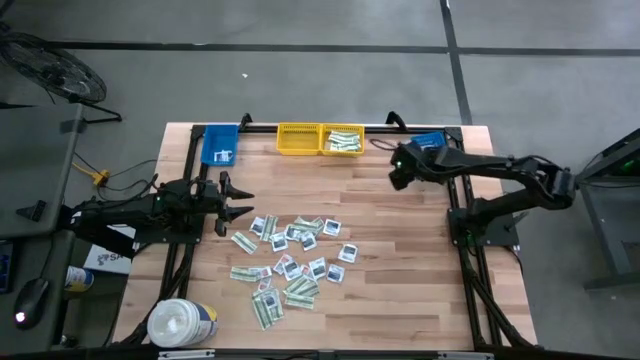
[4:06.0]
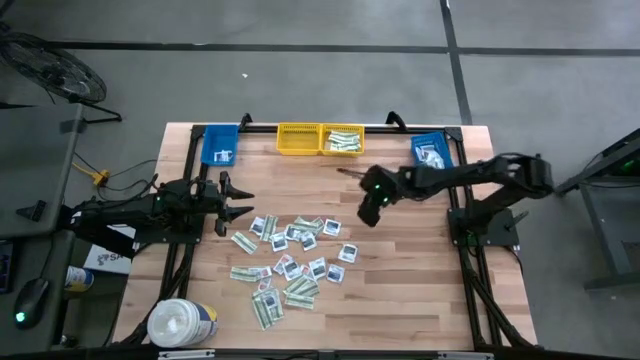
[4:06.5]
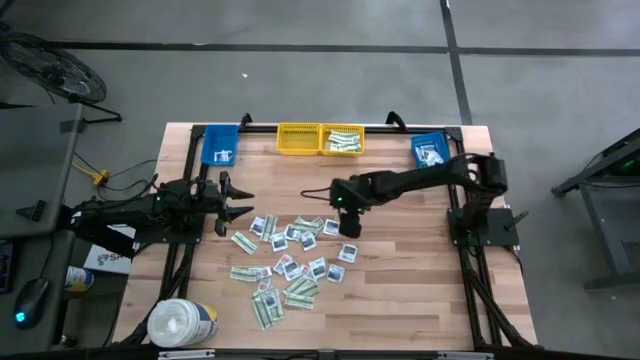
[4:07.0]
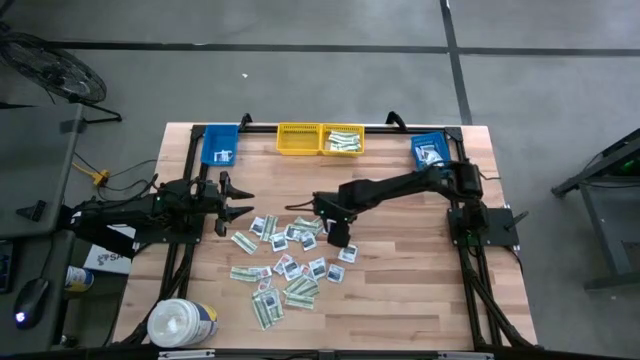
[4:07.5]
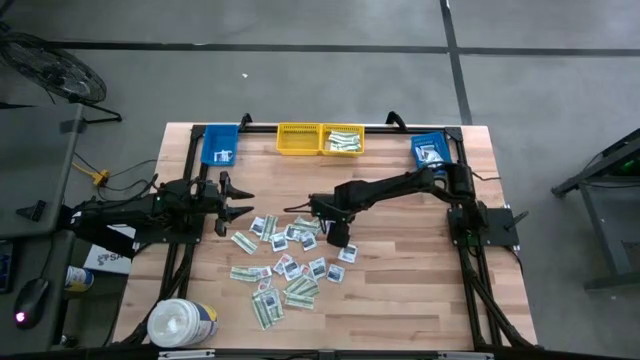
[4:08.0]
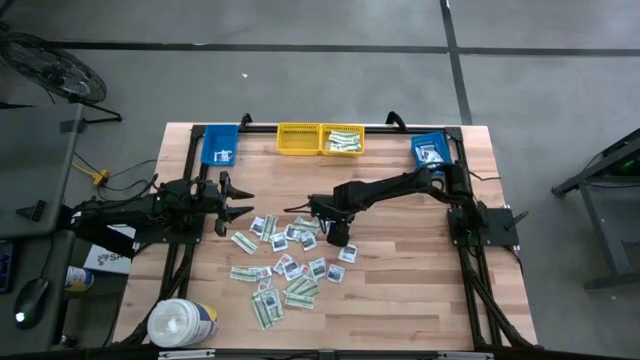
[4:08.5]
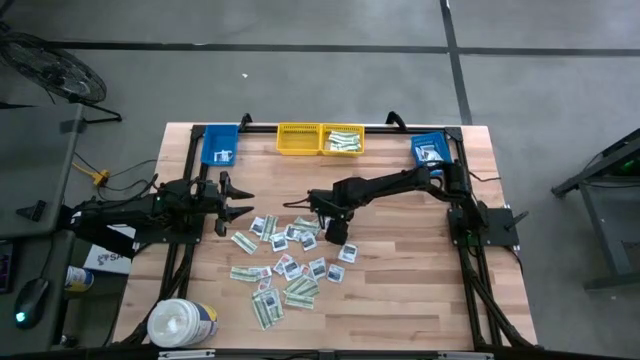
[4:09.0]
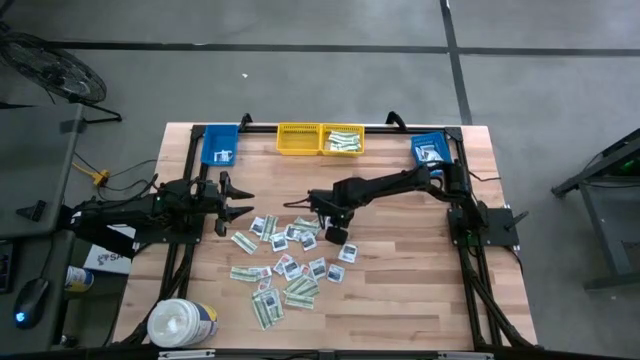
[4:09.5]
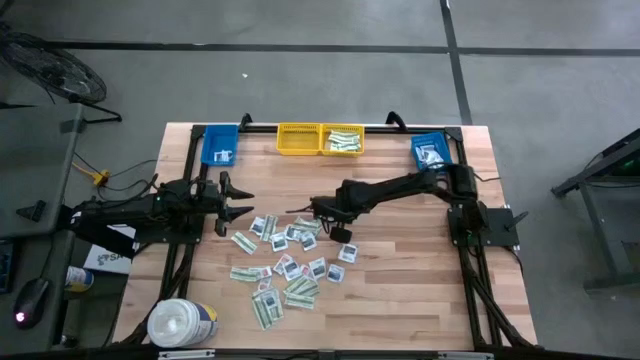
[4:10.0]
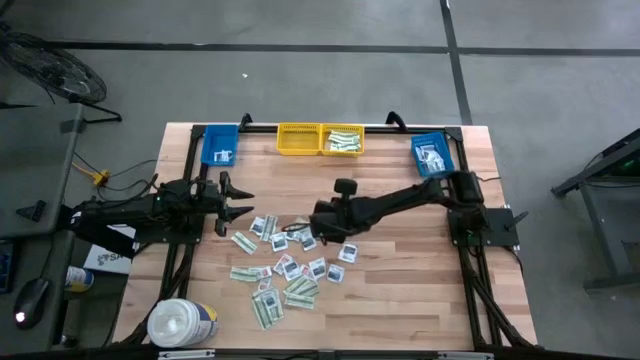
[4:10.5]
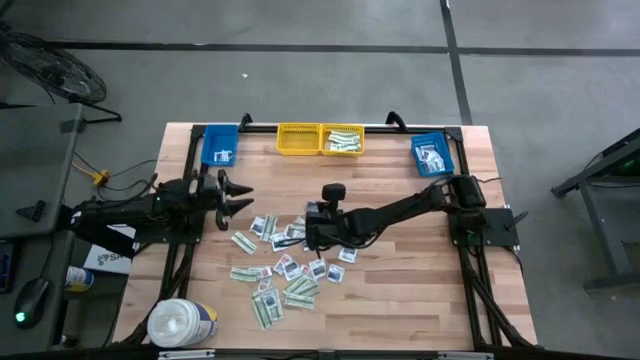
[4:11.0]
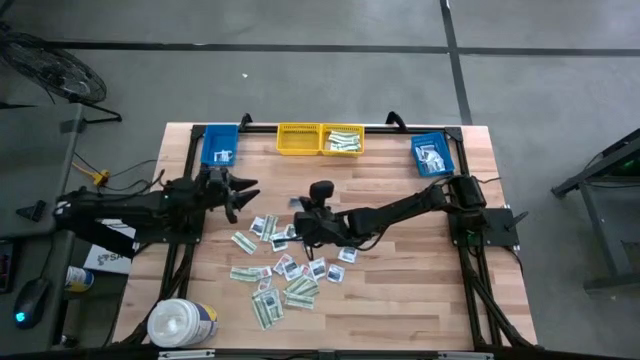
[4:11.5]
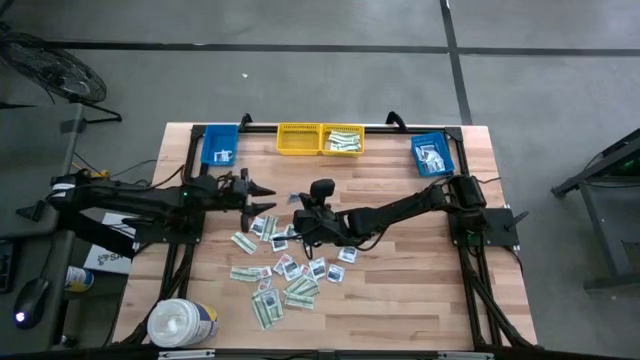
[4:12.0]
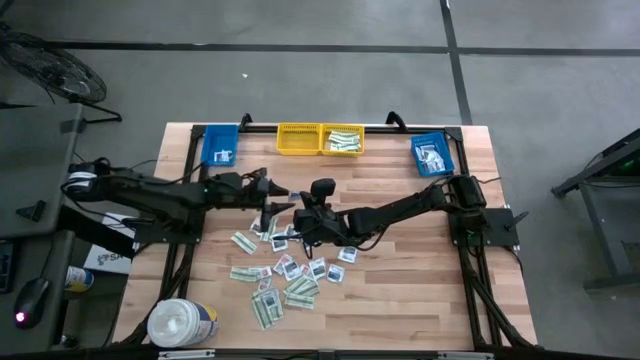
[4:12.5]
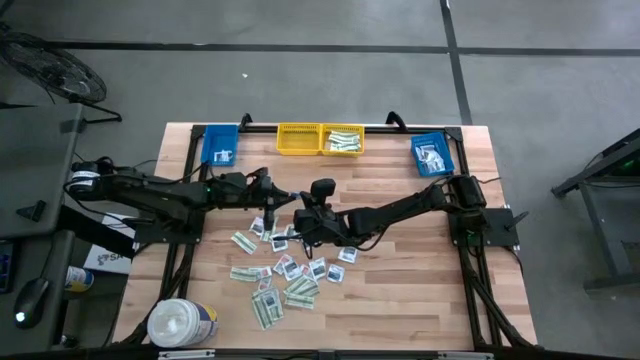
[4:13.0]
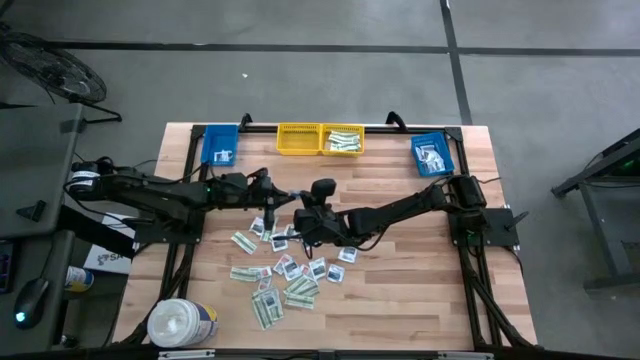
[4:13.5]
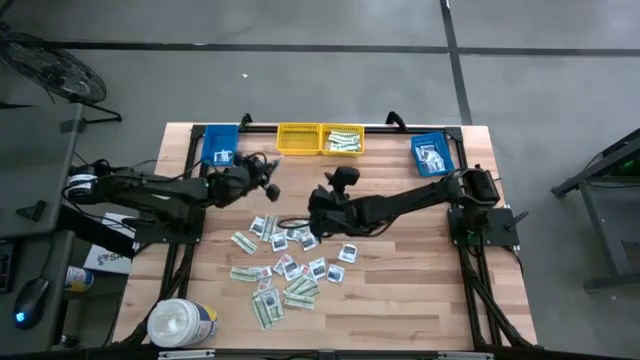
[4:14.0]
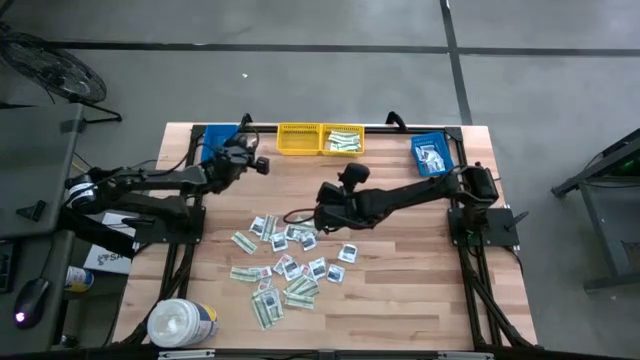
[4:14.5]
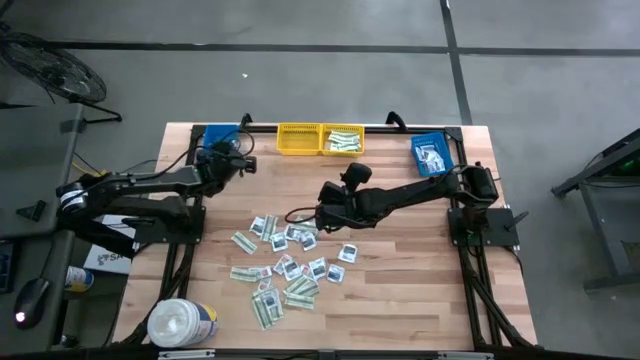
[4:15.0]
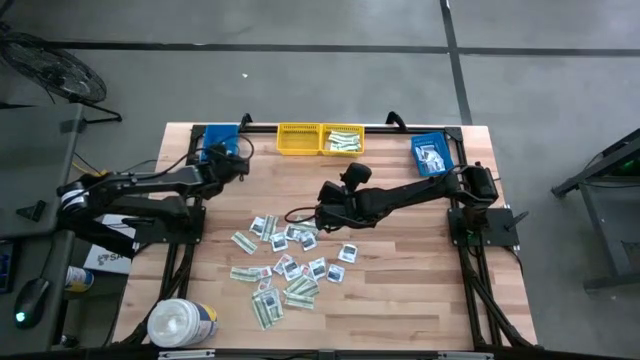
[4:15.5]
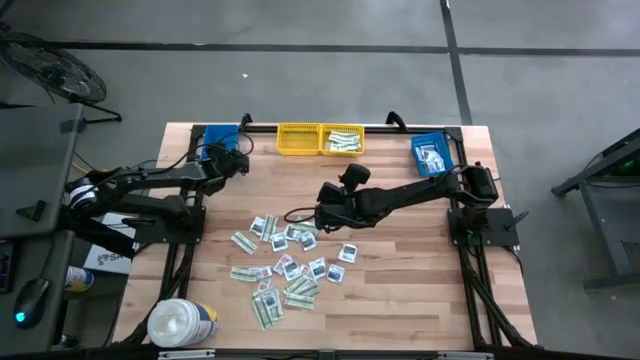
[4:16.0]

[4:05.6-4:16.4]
Task: Pick & Place First Aid Supplies
Put the blue alcohol pad into the left blue bin

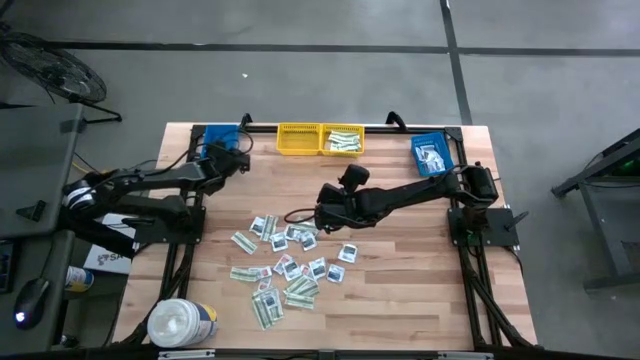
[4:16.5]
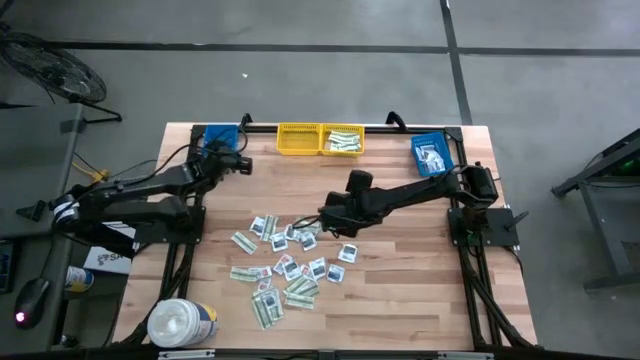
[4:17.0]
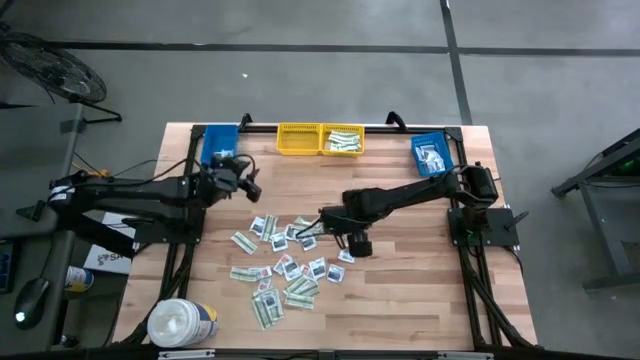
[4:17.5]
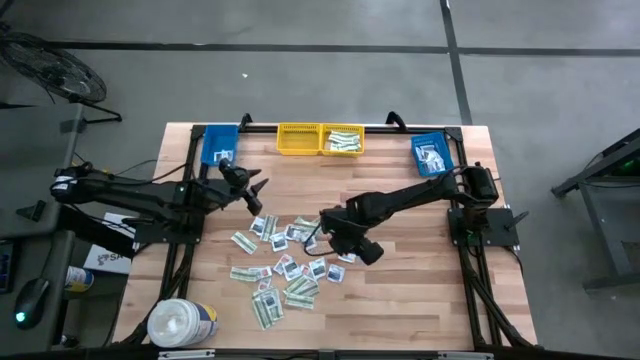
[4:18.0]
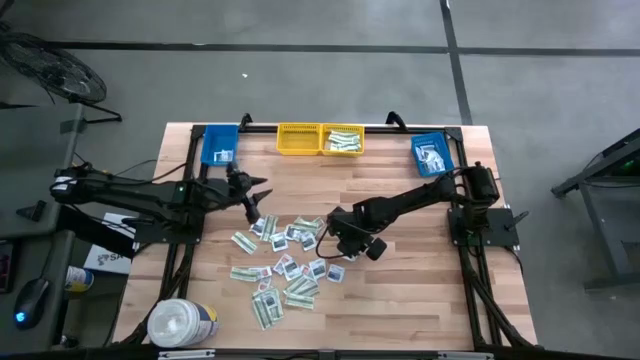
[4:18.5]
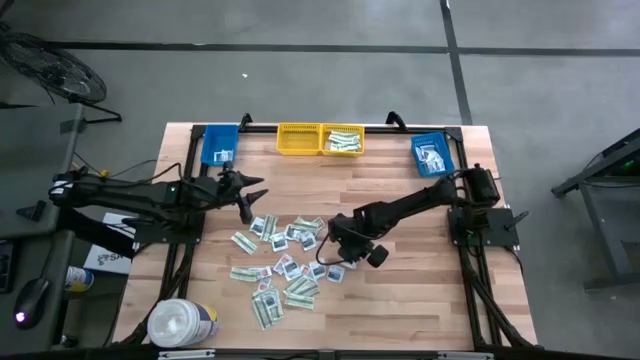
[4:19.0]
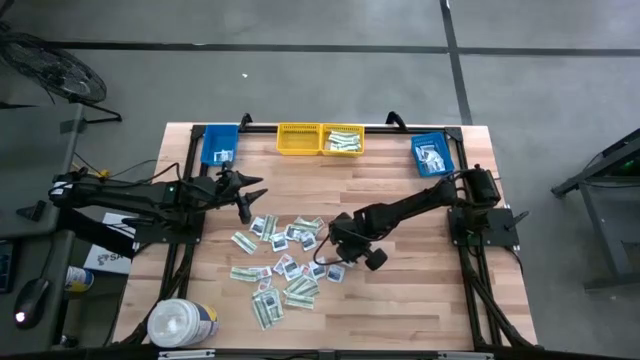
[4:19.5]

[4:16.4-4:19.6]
Put the black towelette pack into the right blue bin

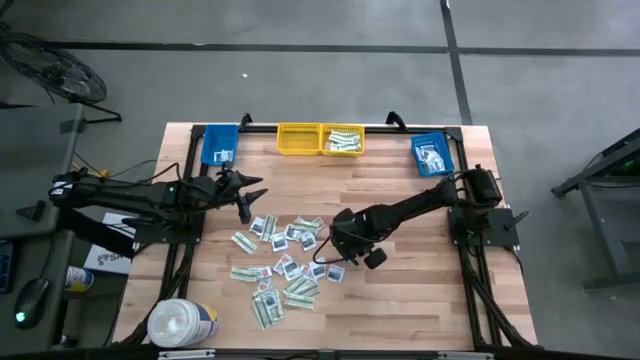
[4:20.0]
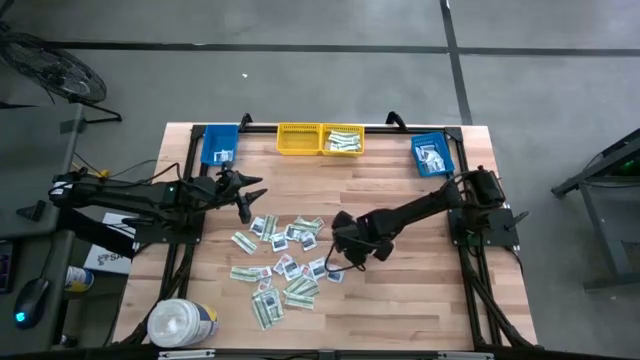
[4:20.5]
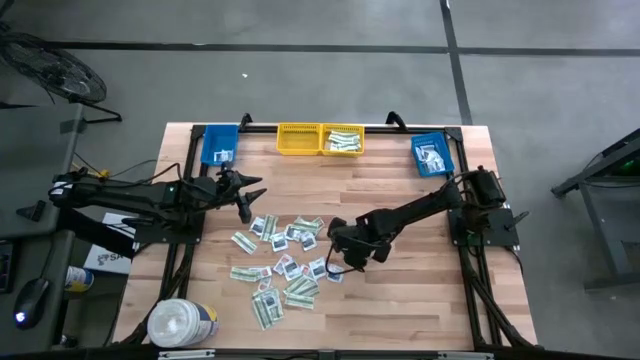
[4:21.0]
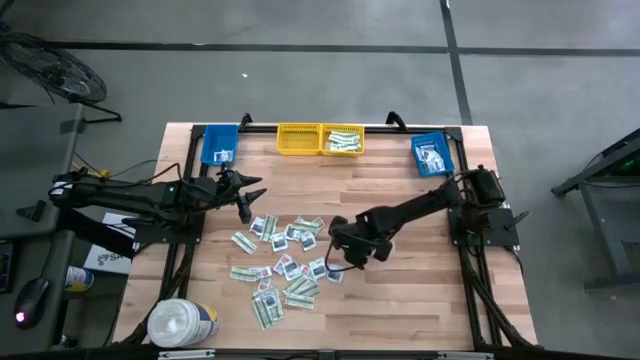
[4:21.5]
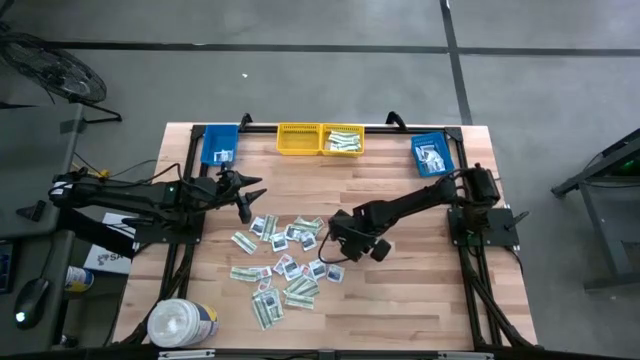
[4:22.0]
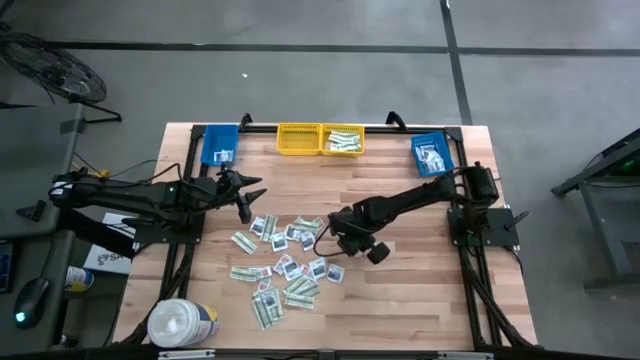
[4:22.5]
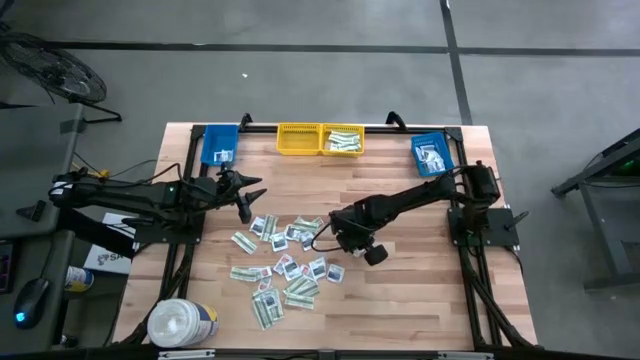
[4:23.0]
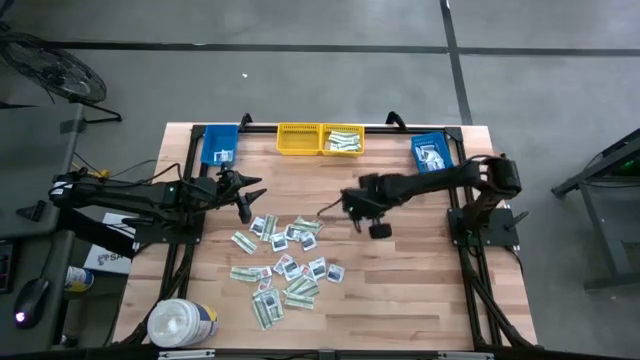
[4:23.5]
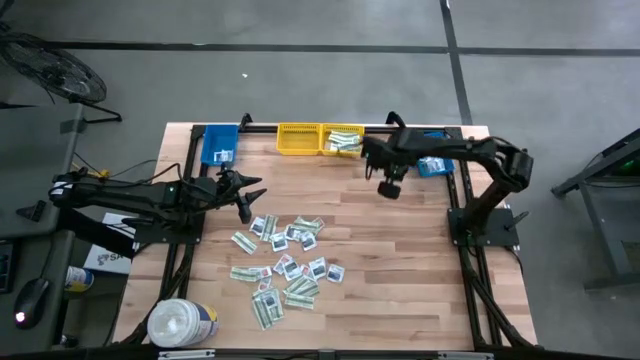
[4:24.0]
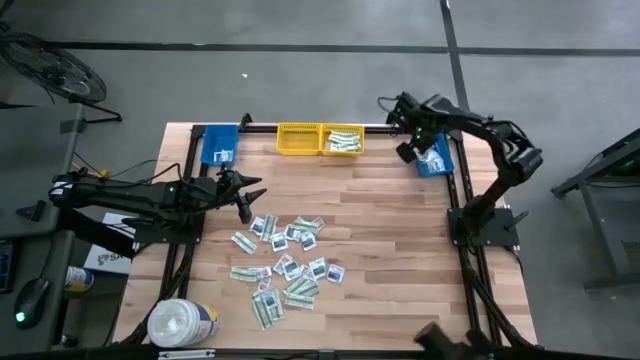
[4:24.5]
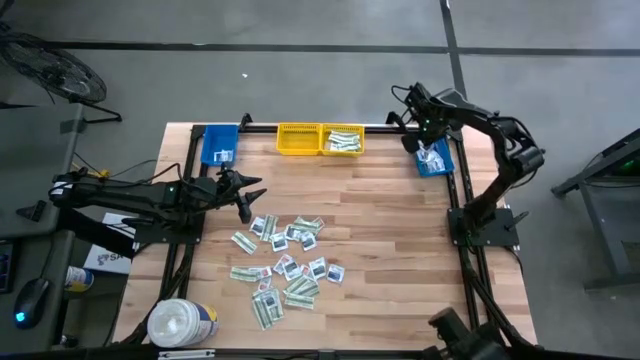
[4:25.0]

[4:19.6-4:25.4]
Put the black towelette pack into the right blue bin
